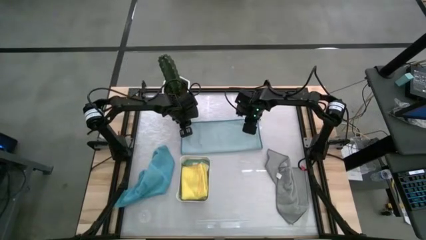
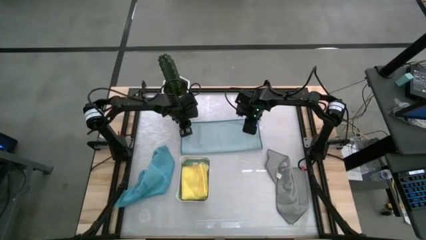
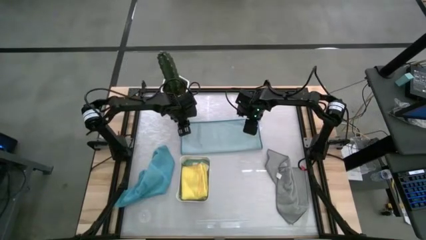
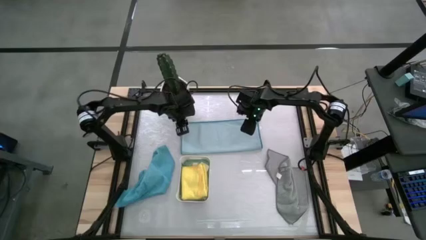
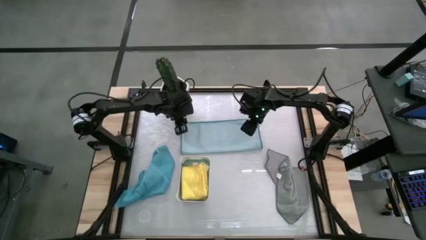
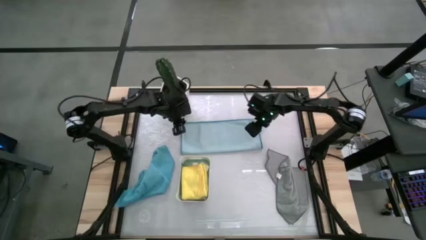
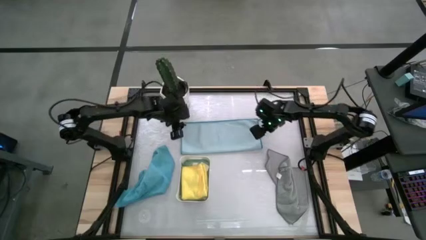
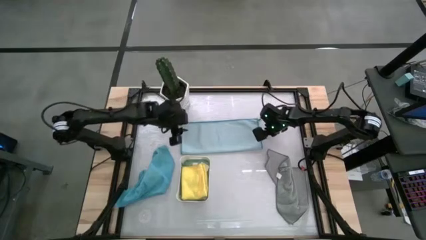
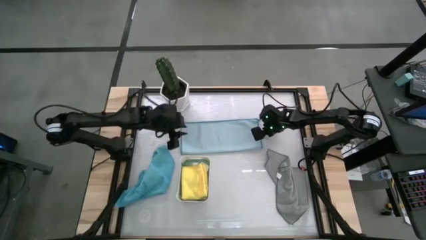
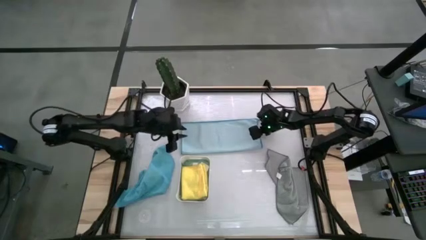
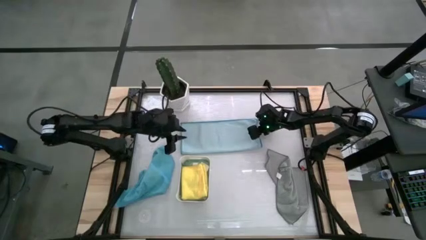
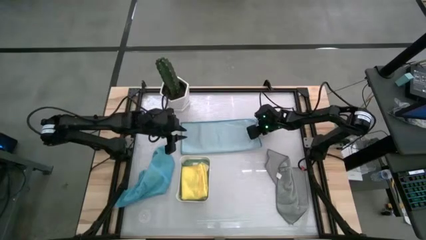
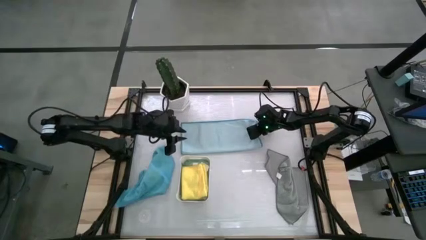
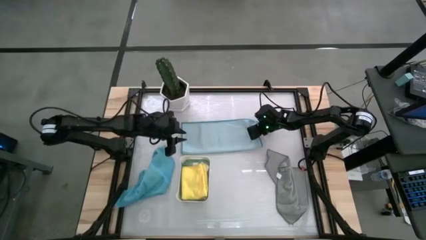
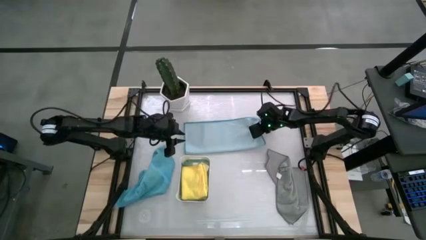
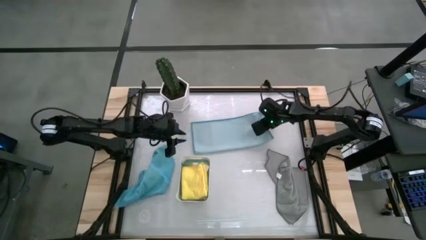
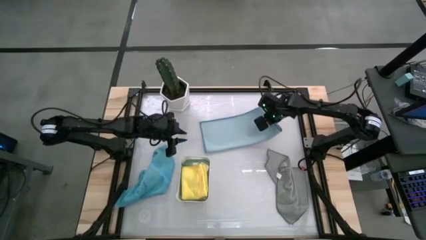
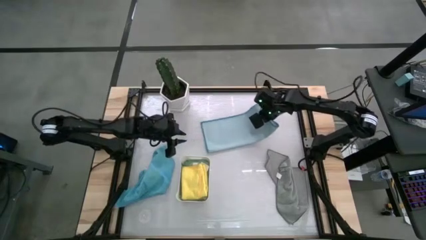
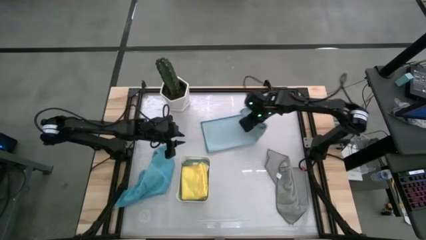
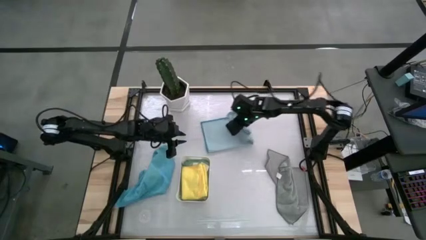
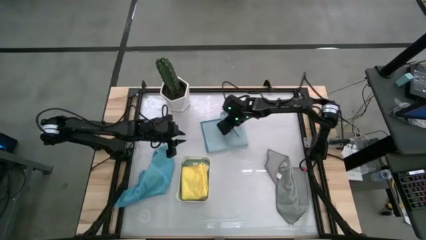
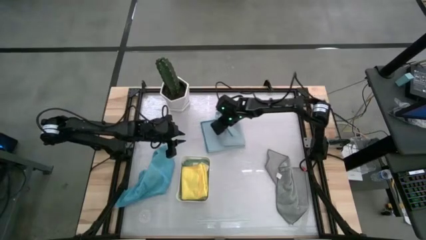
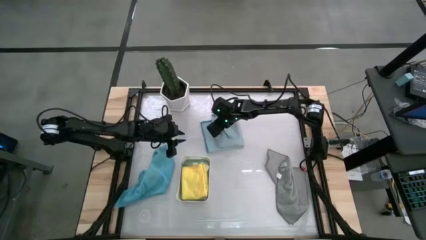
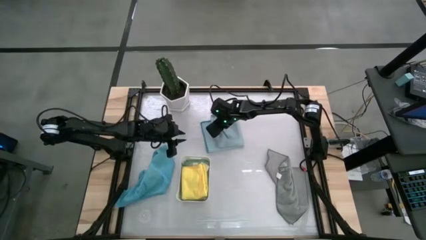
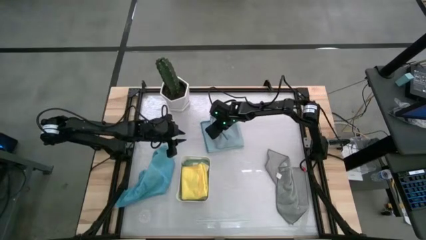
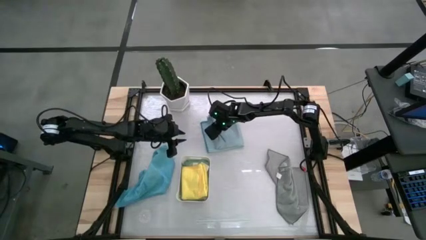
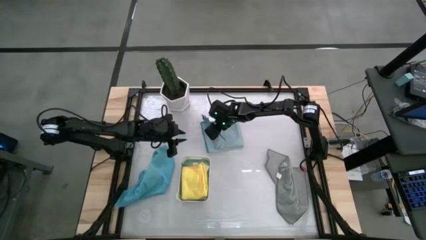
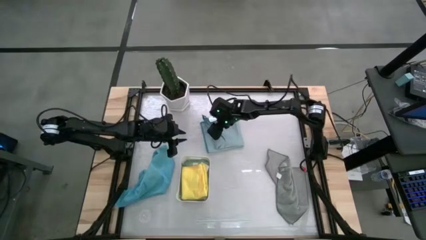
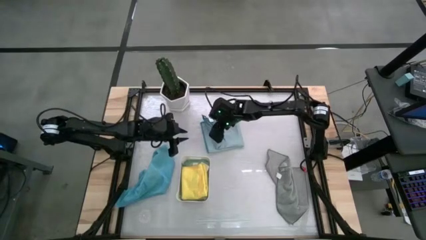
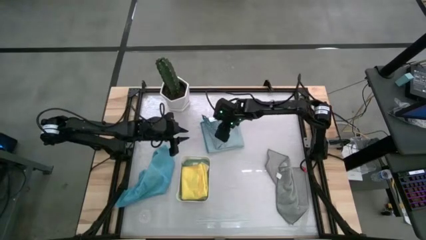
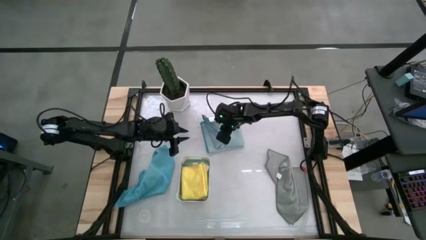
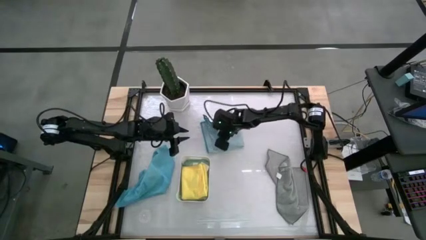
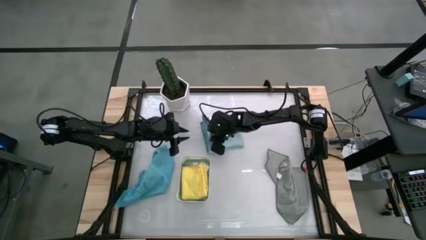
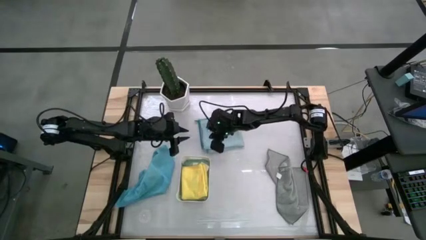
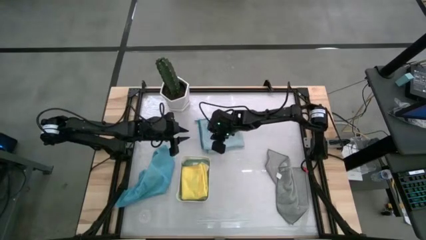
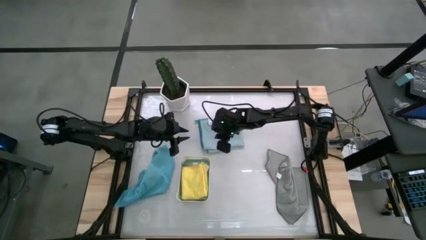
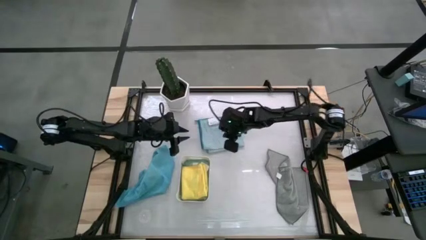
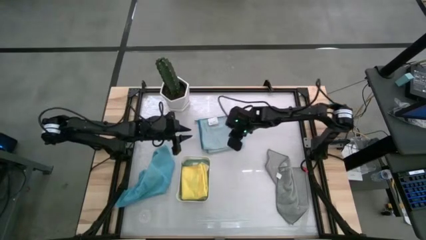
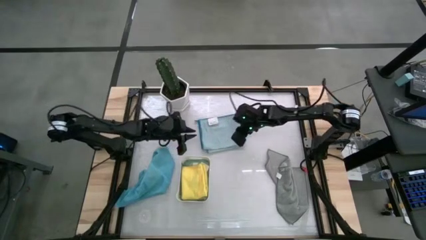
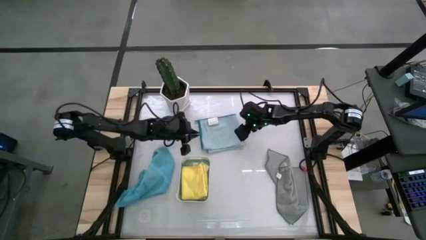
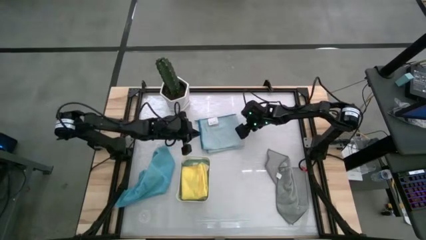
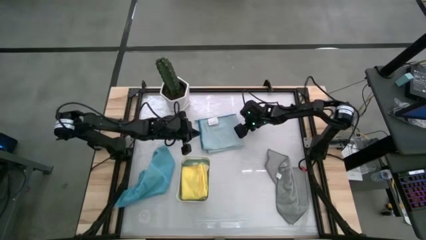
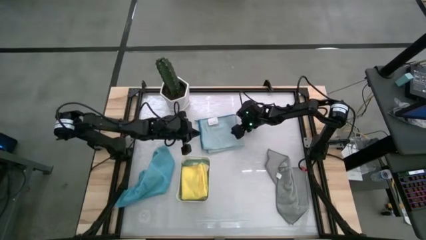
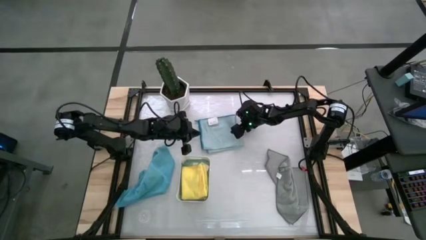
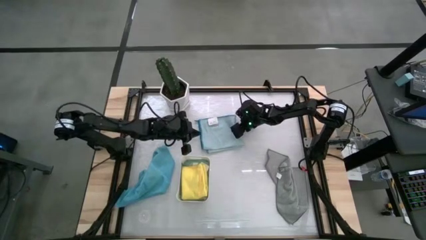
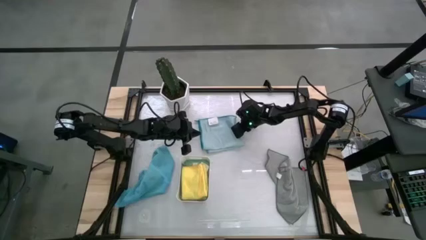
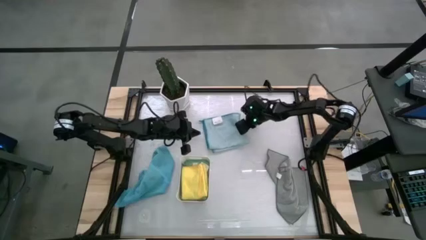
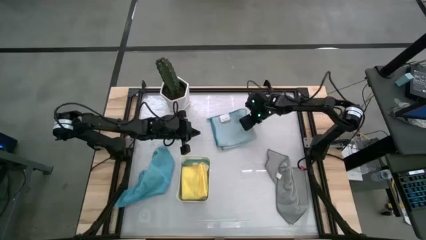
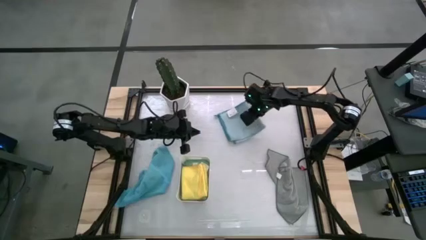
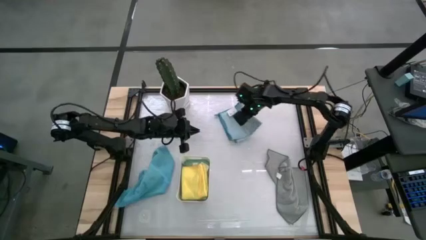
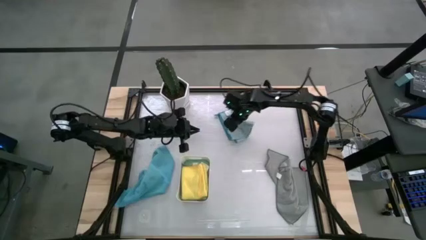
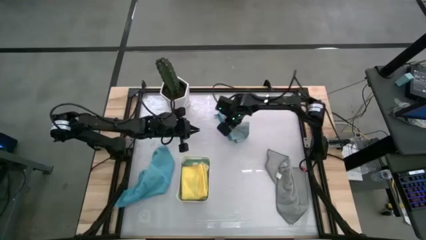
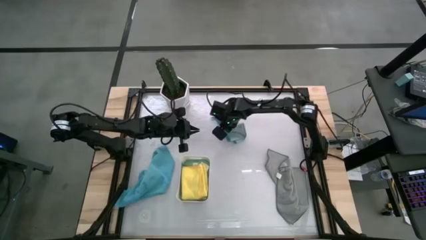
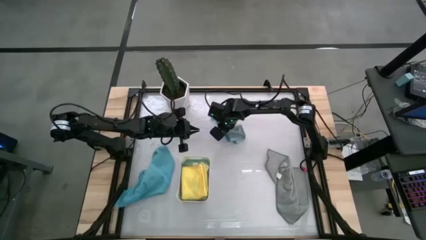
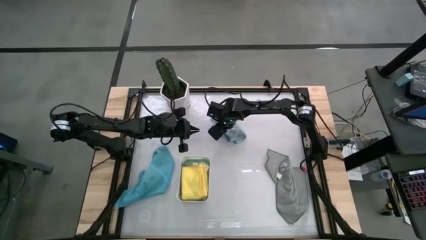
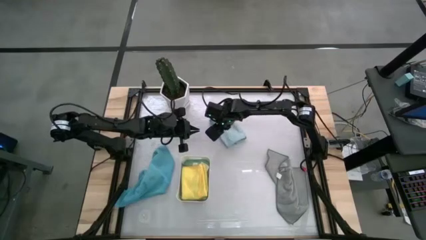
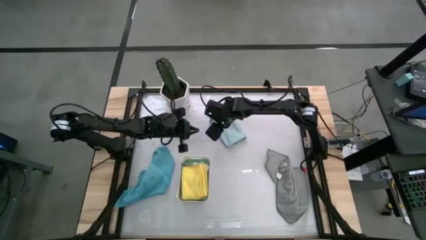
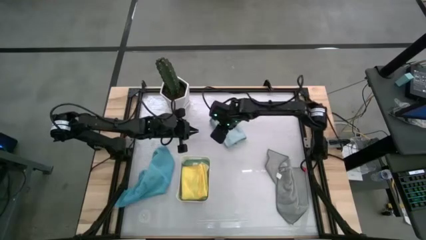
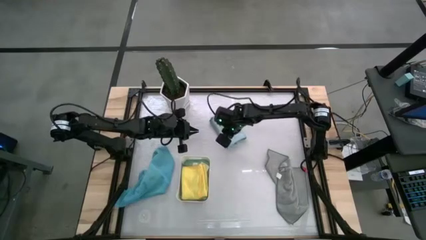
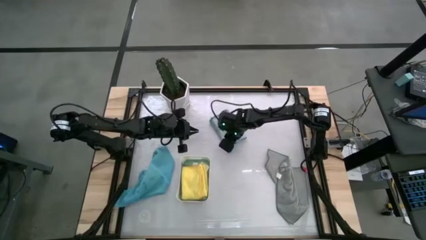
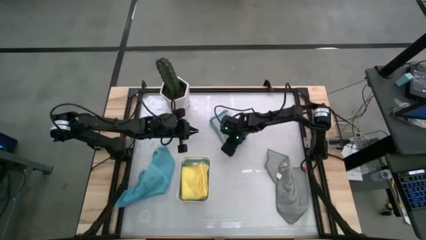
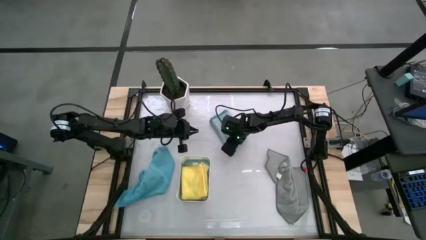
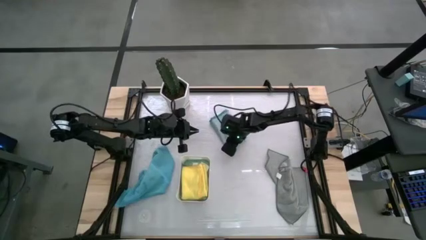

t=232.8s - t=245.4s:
Task: Fold microfiber towels
Fold the light blue microfiber towel
